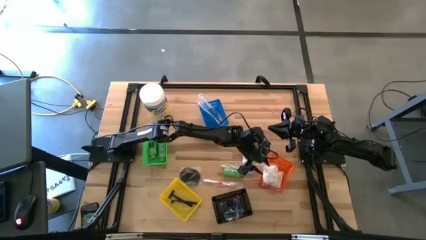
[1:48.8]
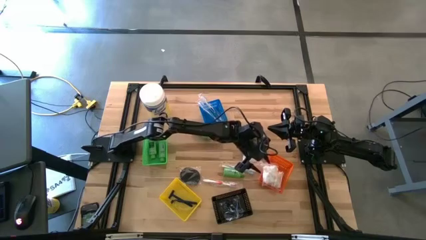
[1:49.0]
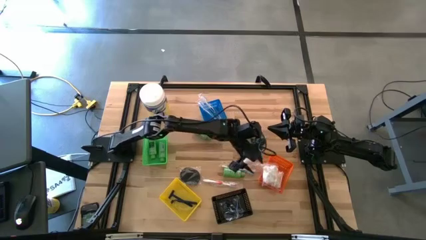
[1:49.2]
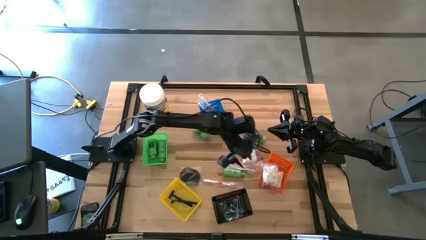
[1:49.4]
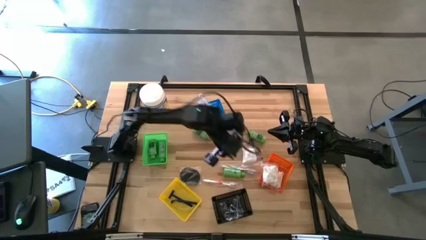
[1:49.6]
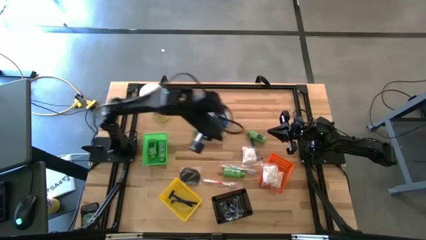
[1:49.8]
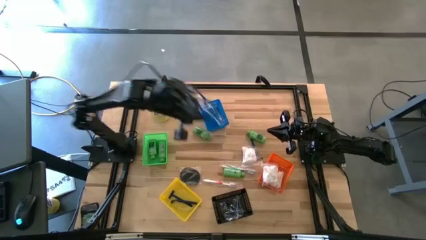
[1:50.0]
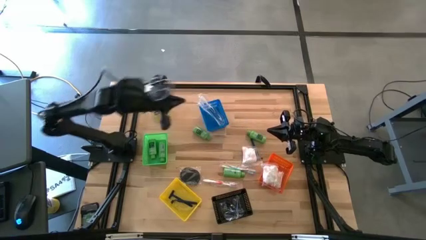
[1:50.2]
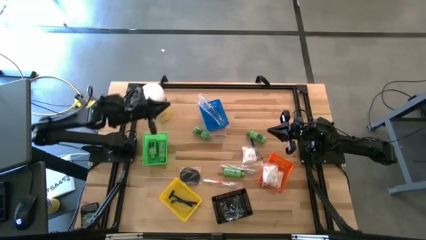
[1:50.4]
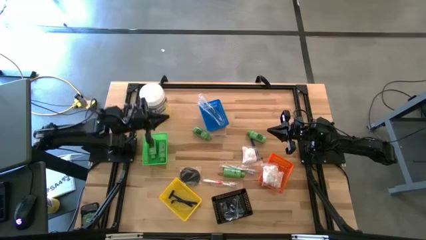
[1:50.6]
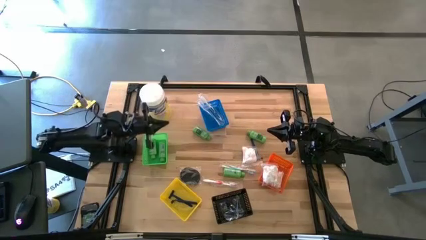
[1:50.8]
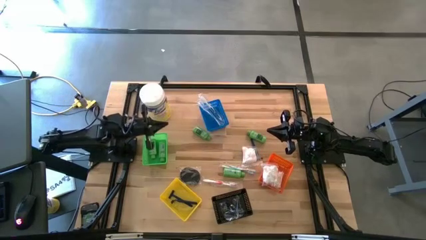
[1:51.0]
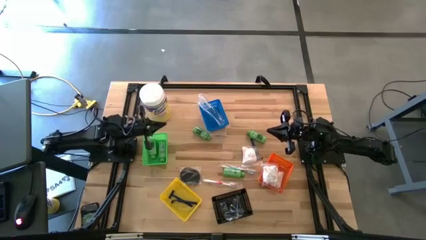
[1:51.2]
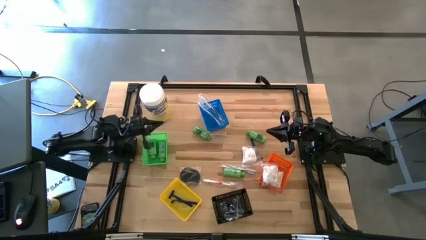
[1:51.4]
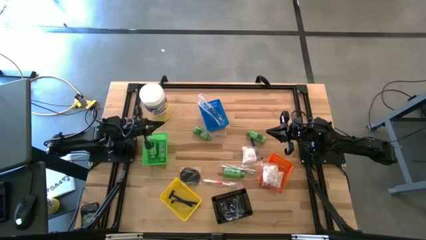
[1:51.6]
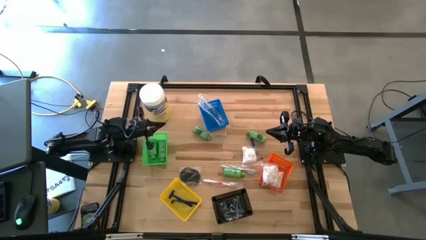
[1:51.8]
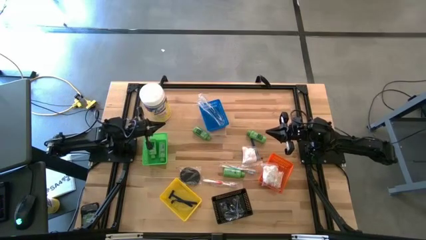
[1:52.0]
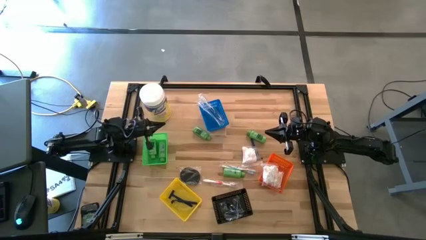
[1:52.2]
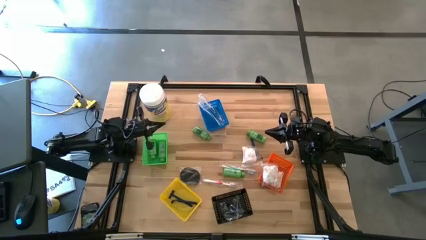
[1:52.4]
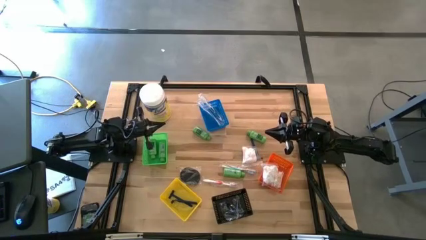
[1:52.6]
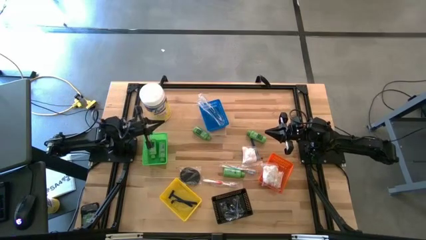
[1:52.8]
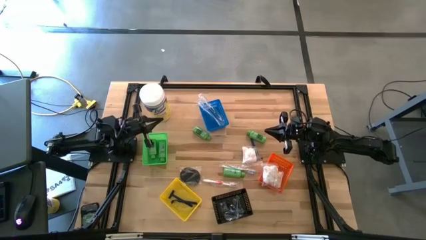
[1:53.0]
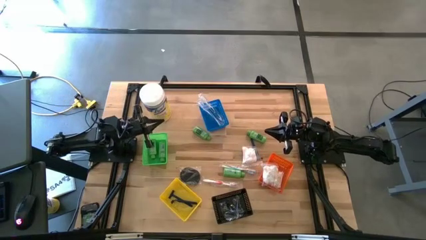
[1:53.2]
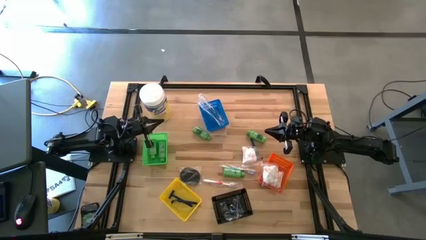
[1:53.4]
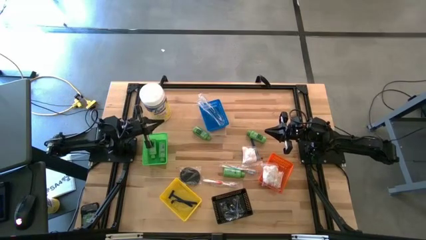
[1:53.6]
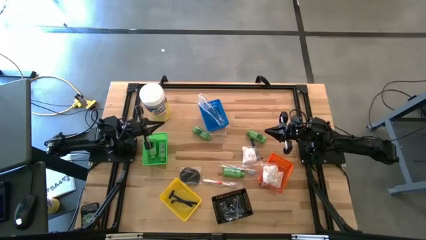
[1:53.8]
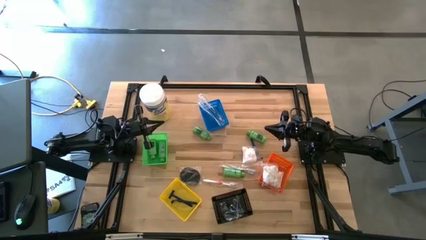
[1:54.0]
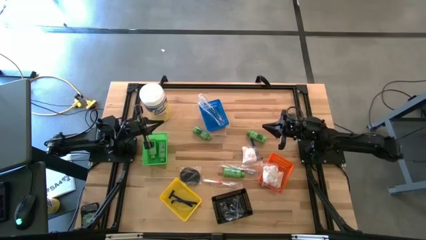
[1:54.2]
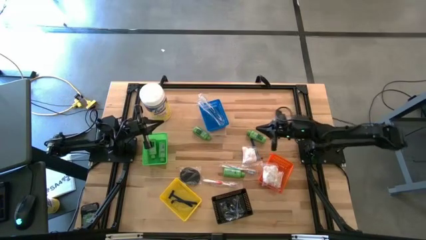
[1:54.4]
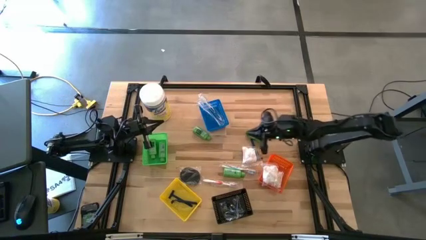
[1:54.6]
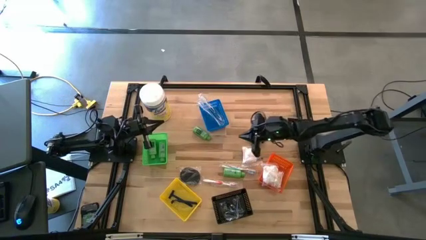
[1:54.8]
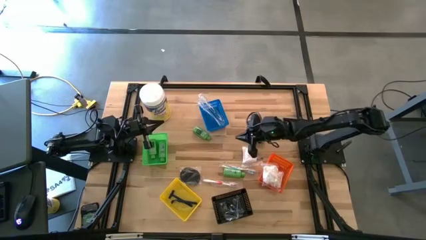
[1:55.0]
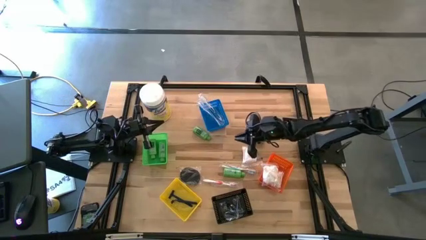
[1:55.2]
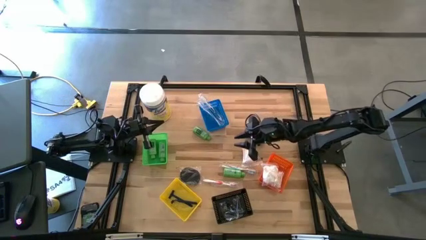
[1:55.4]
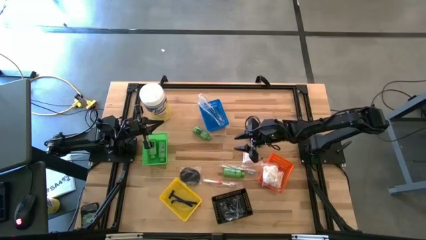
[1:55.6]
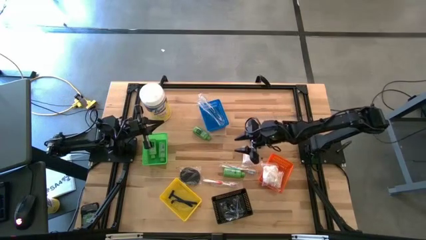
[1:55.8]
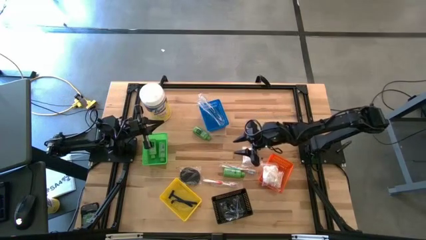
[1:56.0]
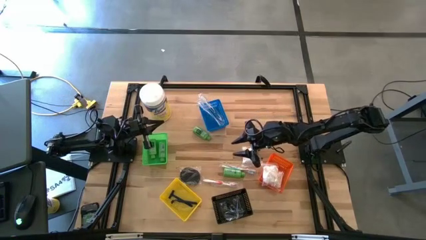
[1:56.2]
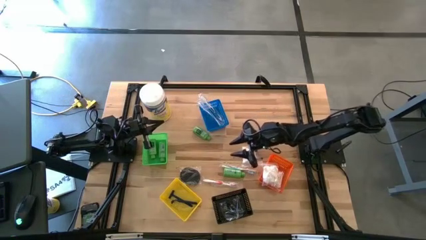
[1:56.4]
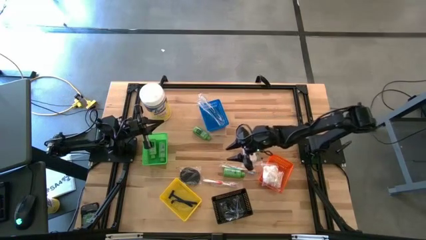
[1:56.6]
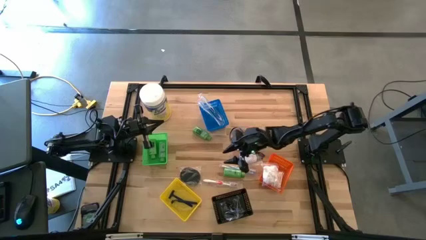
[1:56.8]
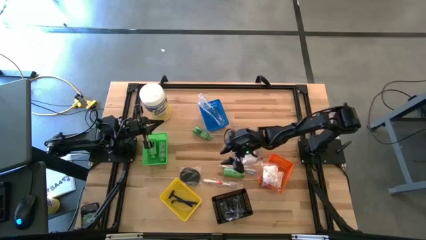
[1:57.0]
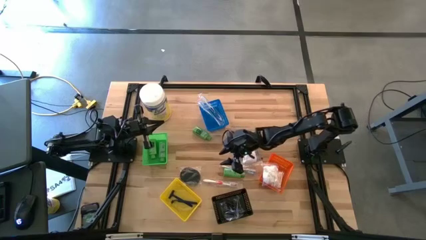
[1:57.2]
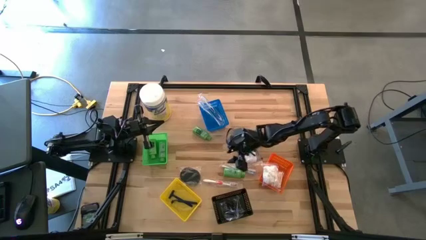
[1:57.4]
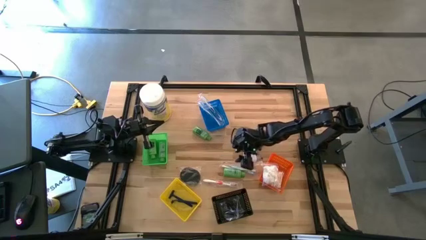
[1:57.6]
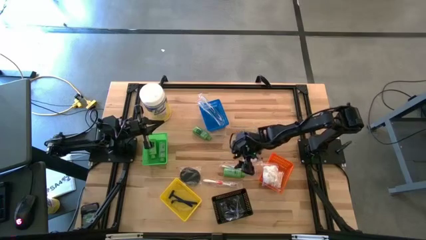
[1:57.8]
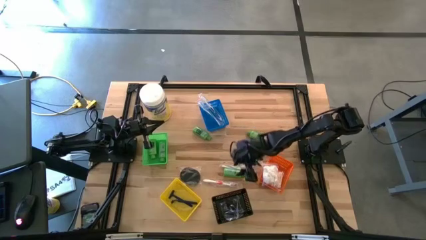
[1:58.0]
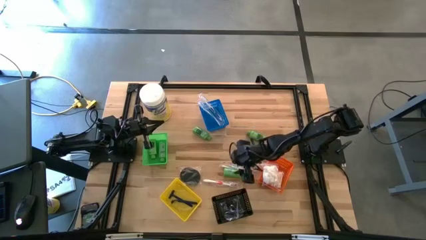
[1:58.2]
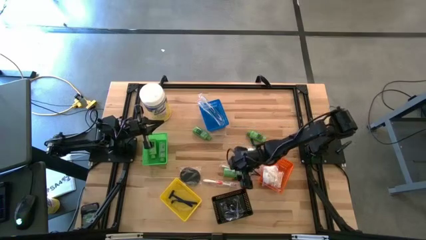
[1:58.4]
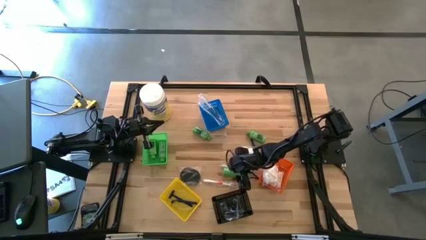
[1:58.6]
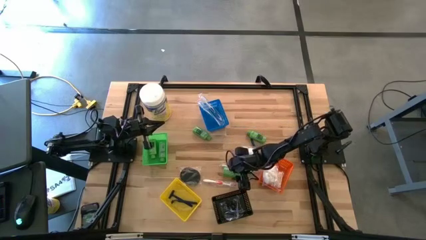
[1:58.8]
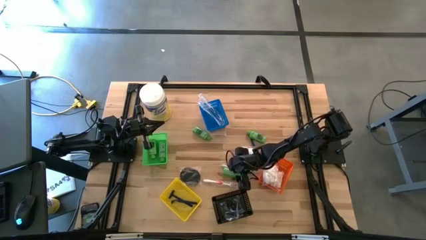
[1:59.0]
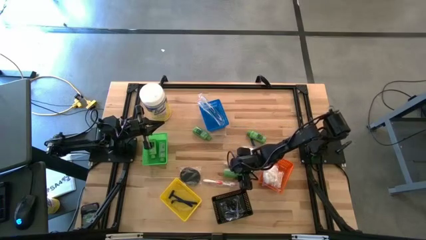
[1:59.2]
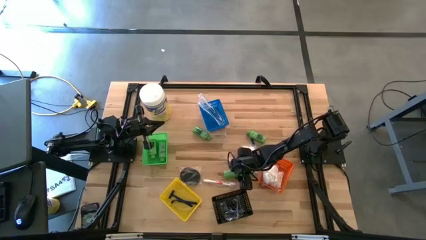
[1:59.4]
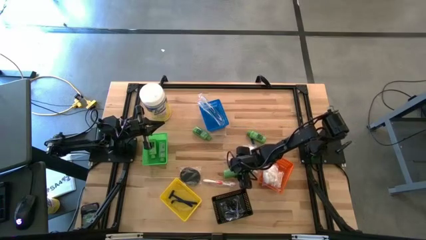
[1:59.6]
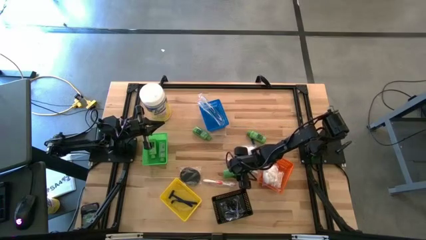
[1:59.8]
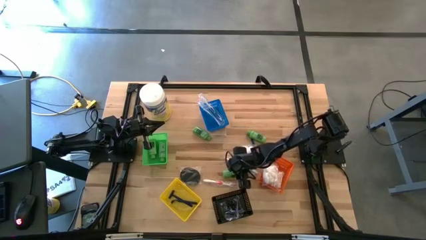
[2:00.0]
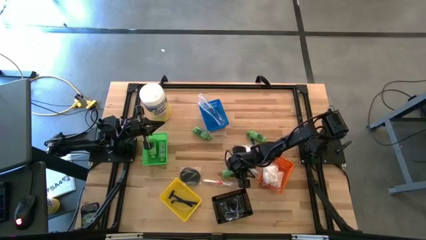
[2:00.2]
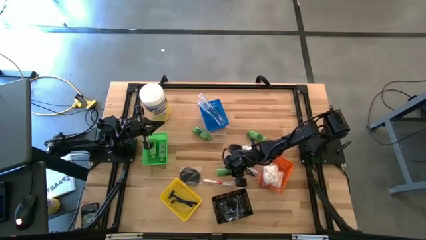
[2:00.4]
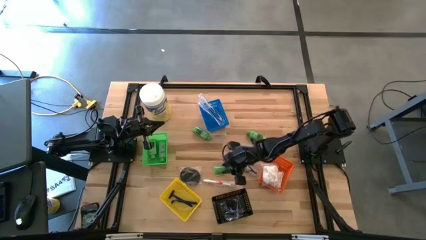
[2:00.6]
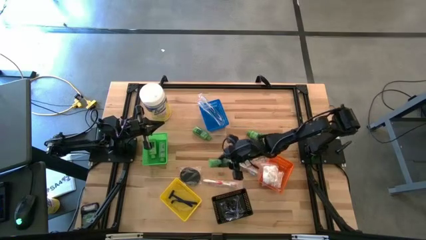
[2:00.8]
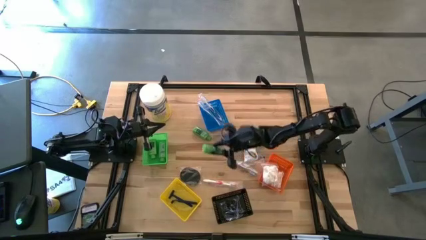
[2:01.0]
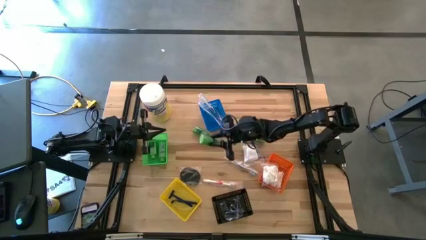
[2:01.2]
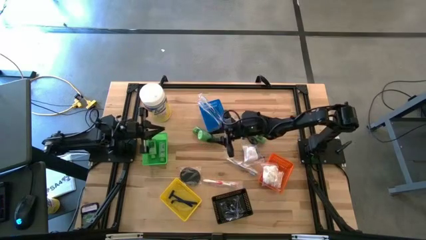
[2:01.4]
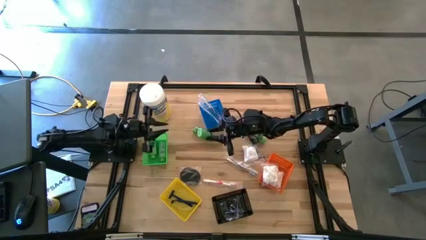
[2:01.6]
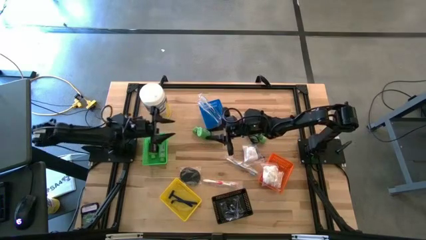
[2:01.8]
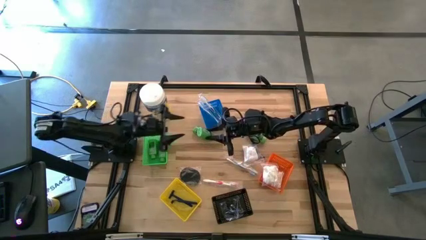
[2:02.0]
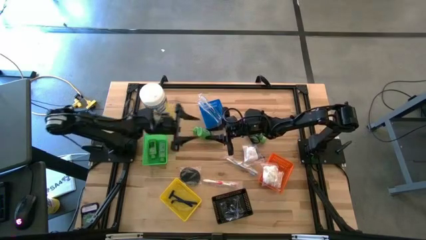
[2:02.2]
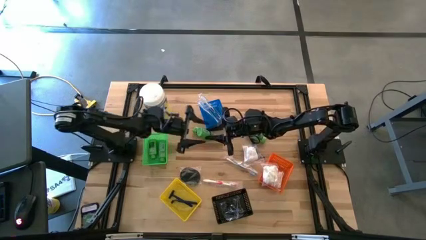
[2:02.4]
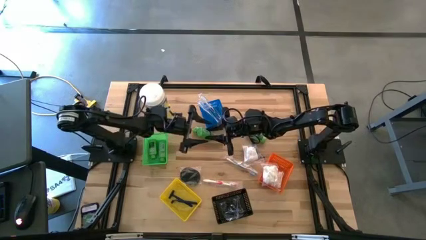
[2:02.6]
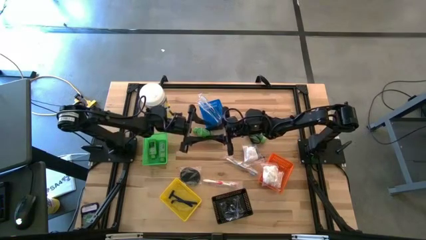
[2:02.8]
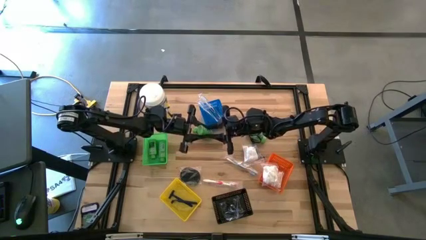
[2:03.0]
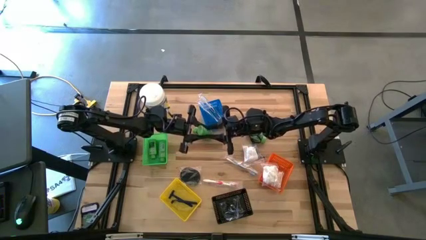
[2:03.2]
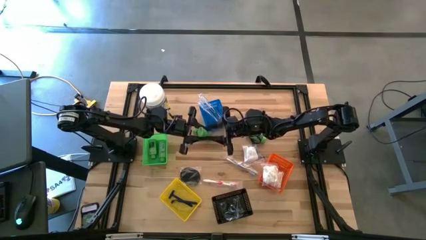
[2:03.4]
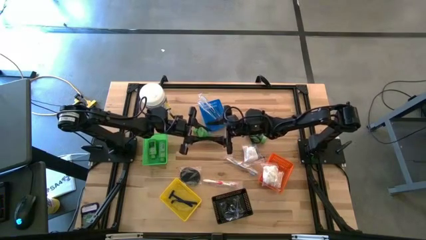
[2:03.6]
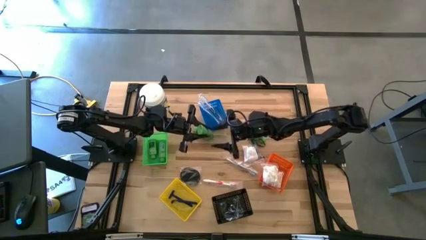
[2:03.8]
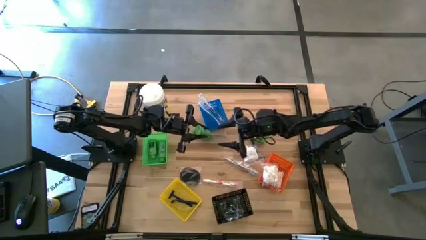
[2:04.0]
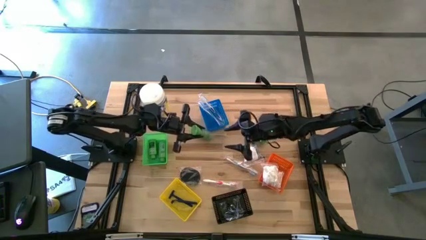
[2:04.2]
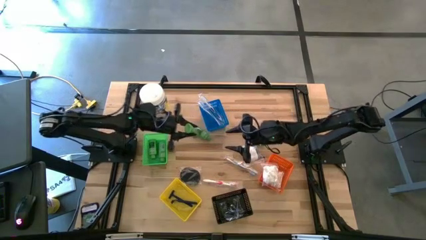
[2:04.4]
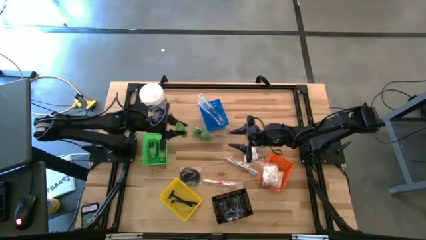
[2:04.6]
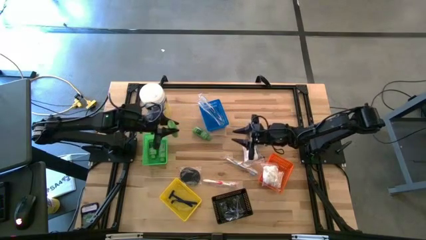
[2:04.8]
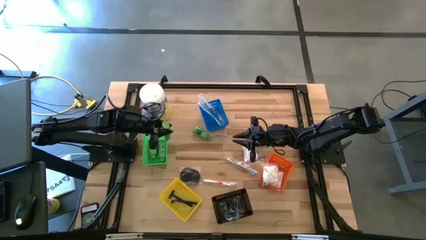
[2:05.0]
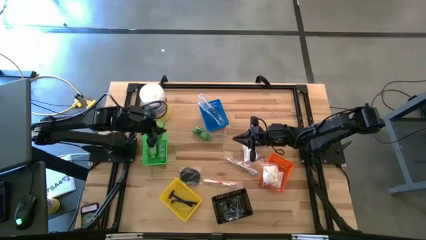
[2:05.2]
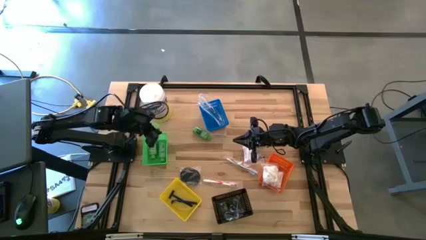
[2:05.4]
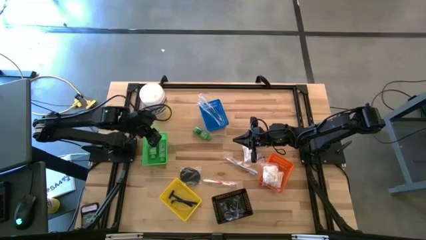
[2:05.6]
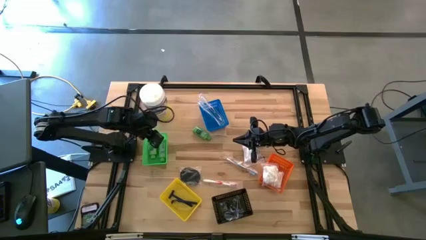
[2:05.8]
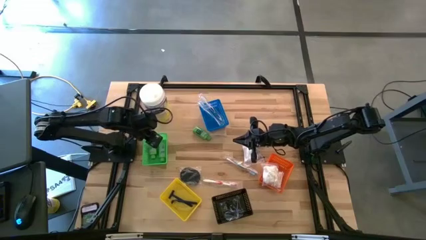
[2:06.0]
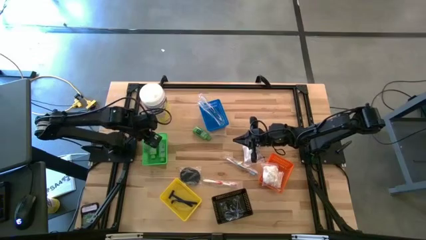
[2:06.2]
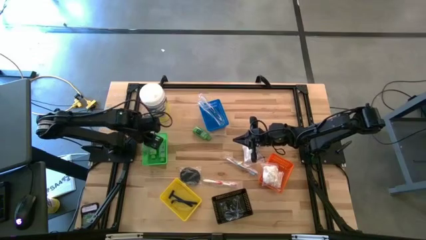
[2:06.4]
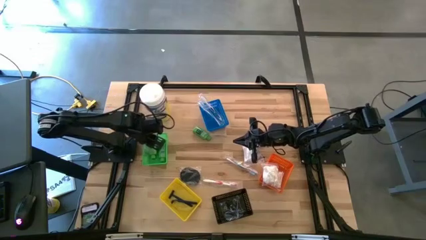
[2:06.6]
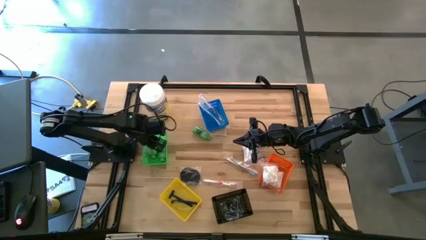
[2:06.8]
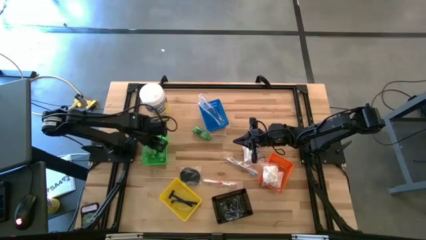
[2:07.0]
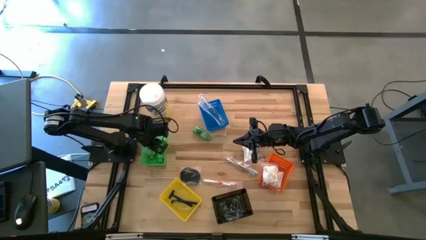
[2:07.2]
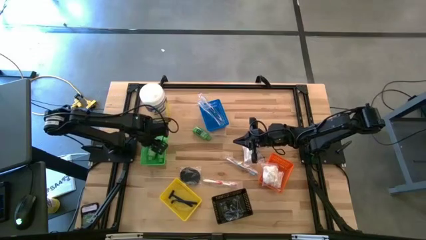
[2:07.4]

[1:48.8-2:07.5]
Task: Pick & Place Travel size toiletries
Put the green shampoo into the green bin
